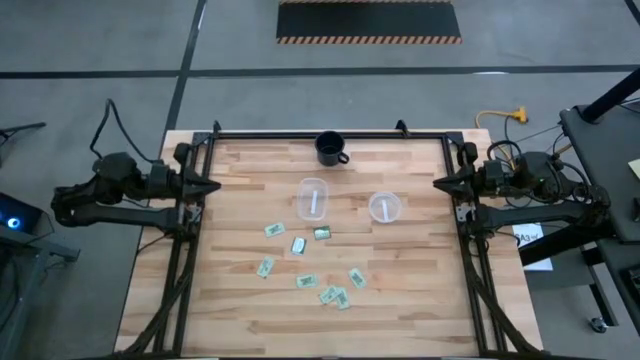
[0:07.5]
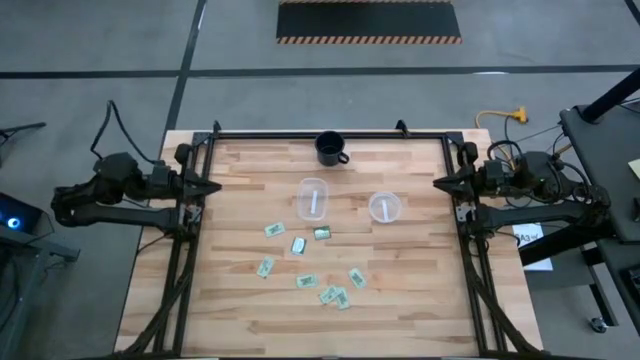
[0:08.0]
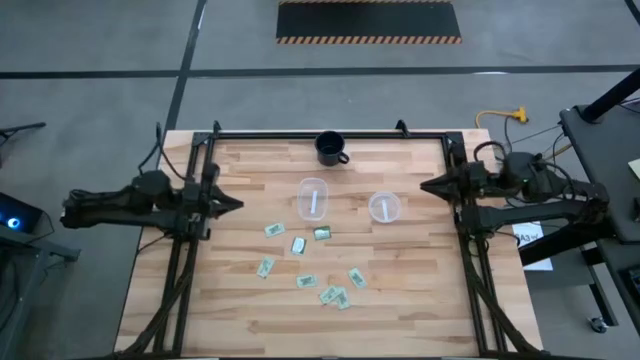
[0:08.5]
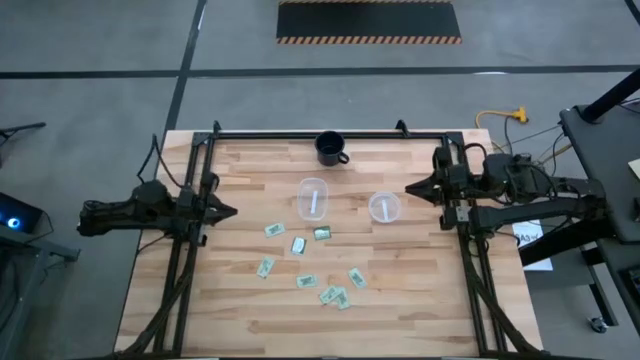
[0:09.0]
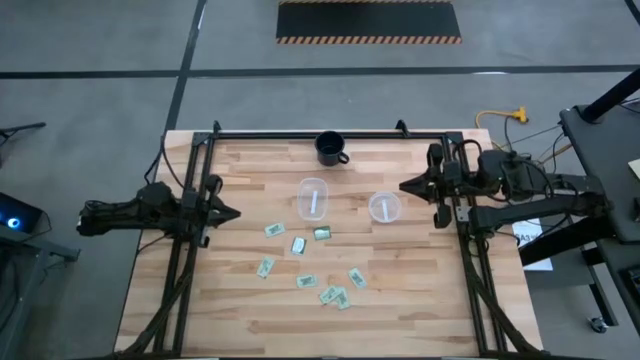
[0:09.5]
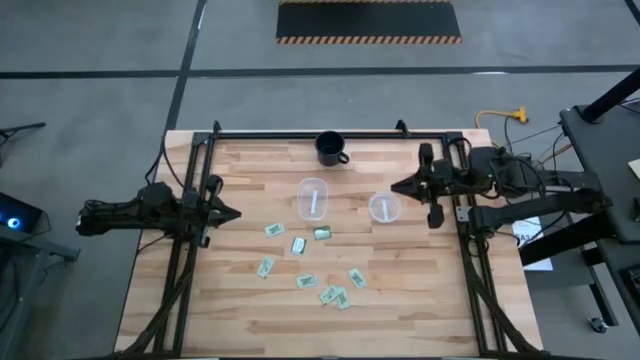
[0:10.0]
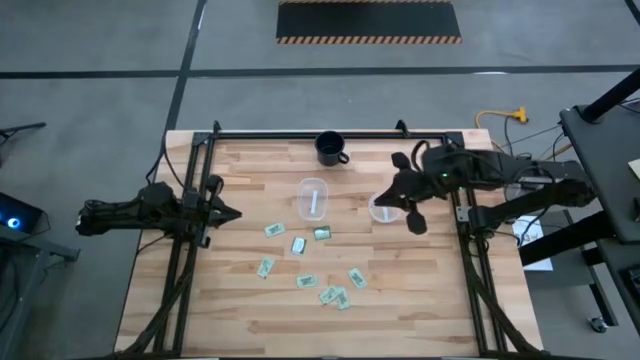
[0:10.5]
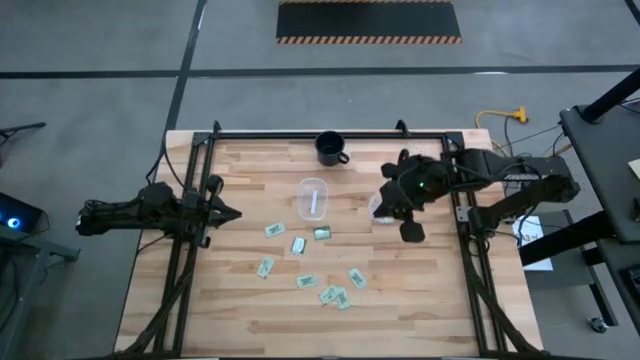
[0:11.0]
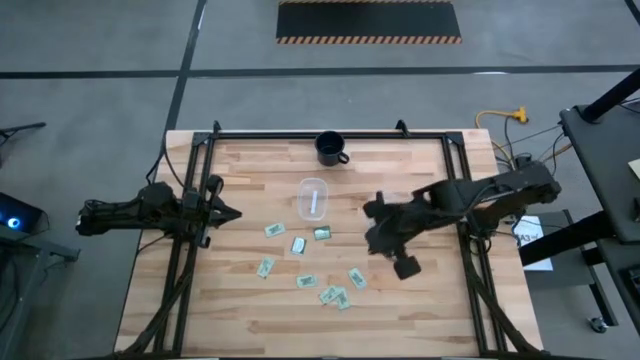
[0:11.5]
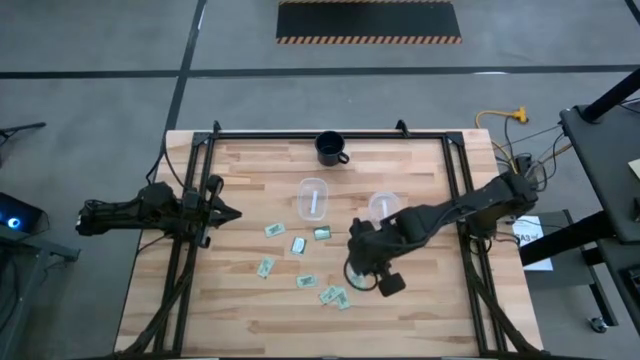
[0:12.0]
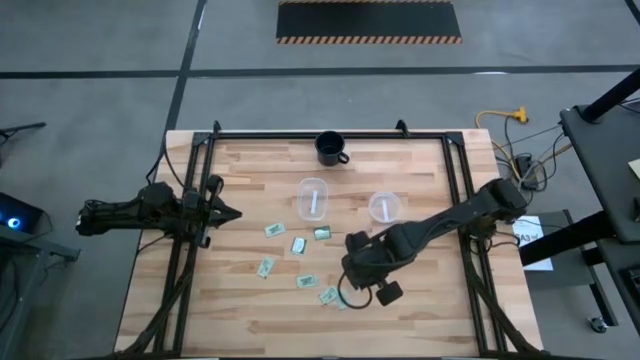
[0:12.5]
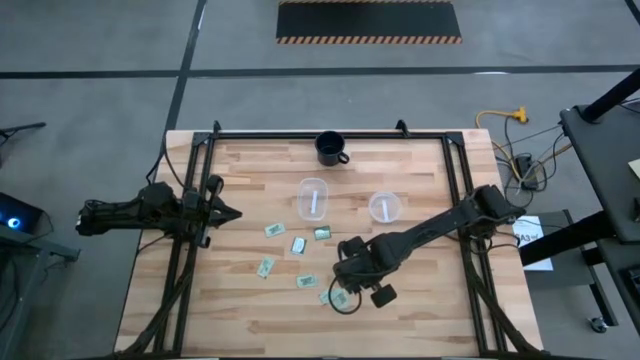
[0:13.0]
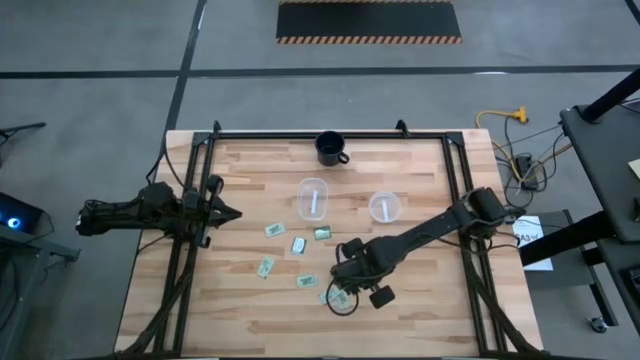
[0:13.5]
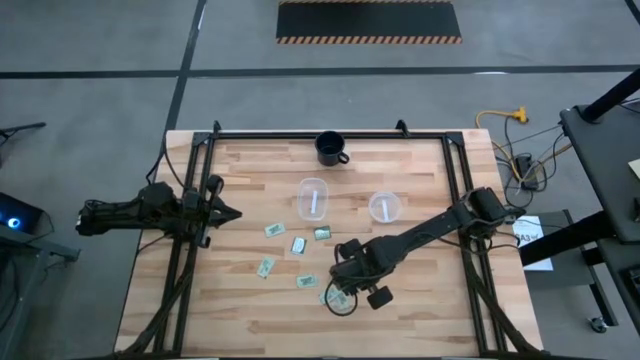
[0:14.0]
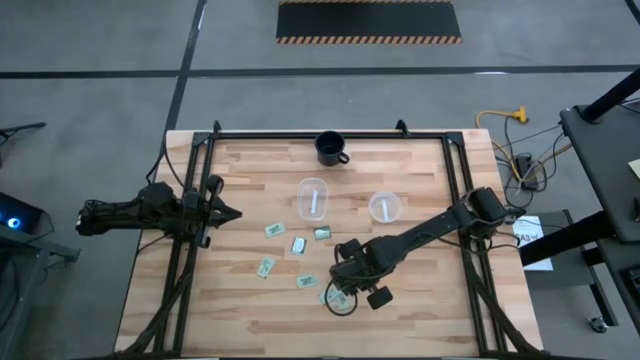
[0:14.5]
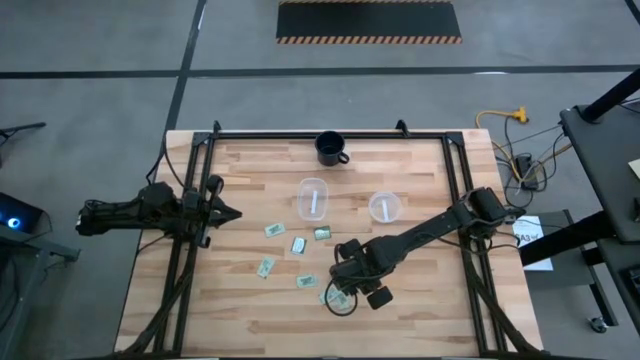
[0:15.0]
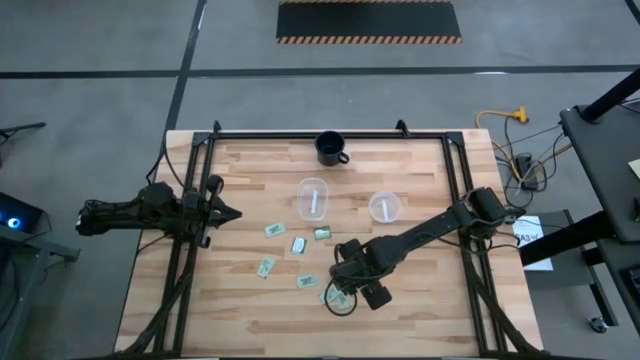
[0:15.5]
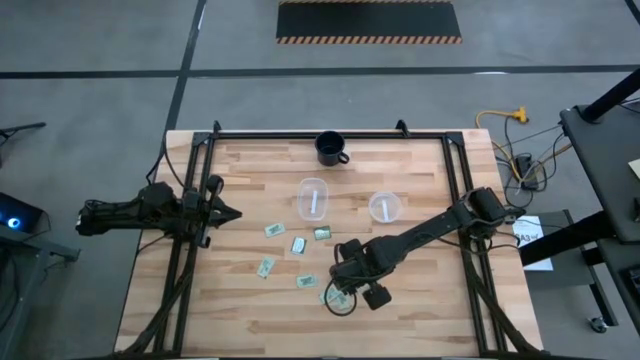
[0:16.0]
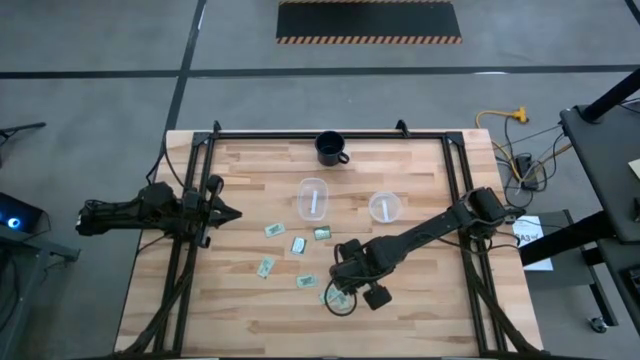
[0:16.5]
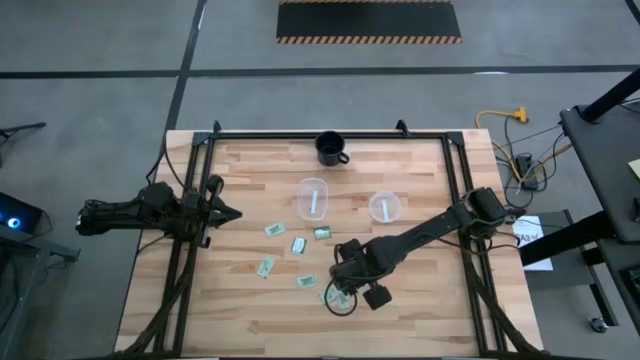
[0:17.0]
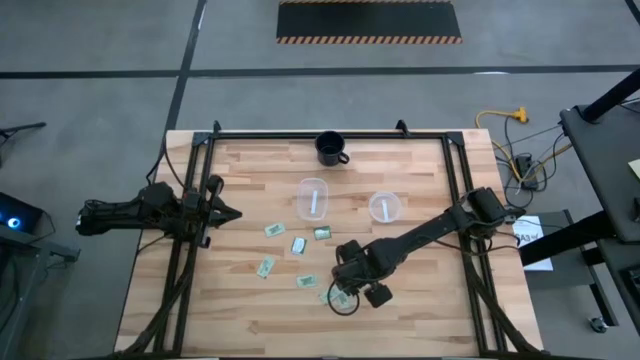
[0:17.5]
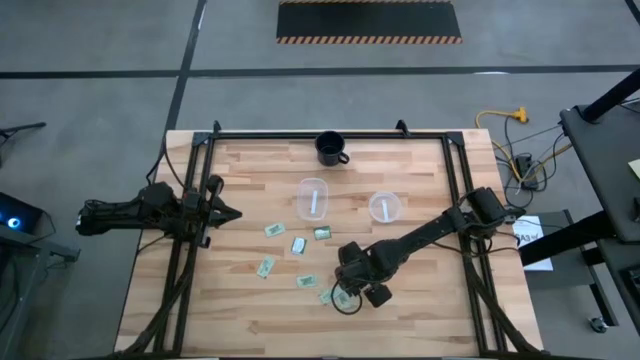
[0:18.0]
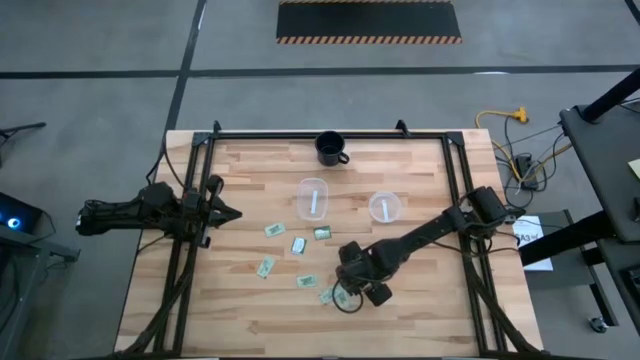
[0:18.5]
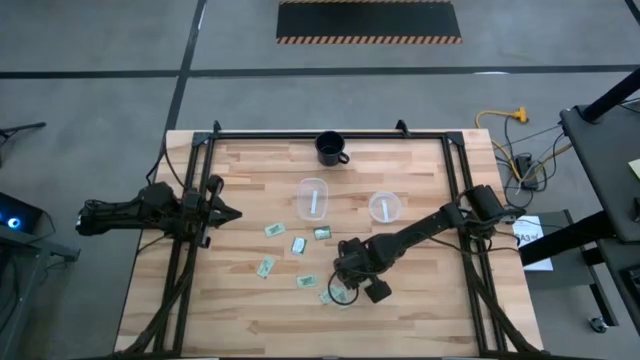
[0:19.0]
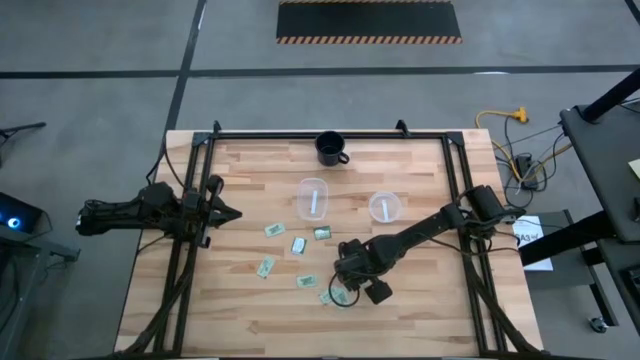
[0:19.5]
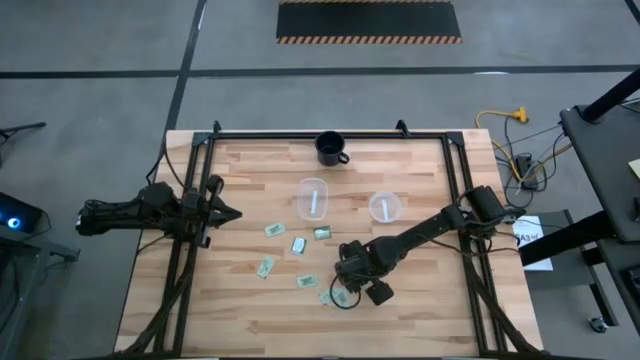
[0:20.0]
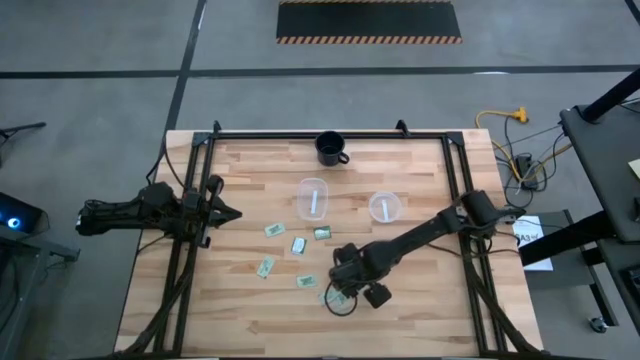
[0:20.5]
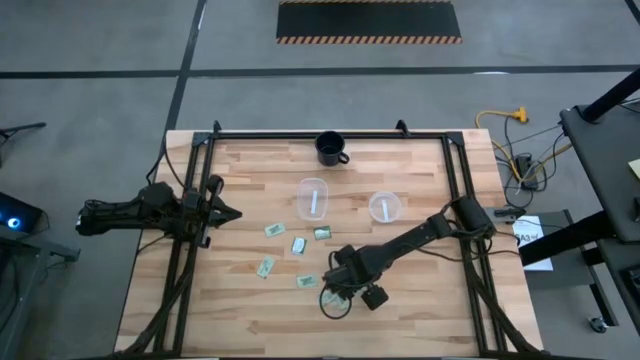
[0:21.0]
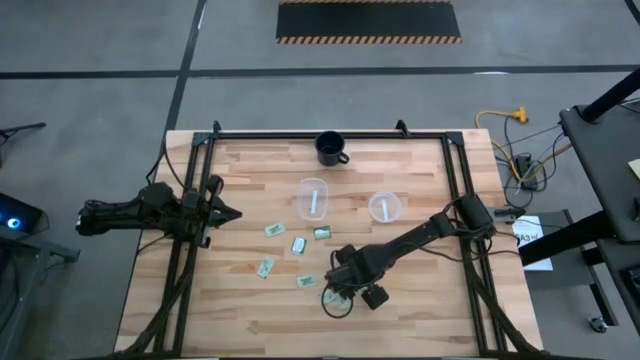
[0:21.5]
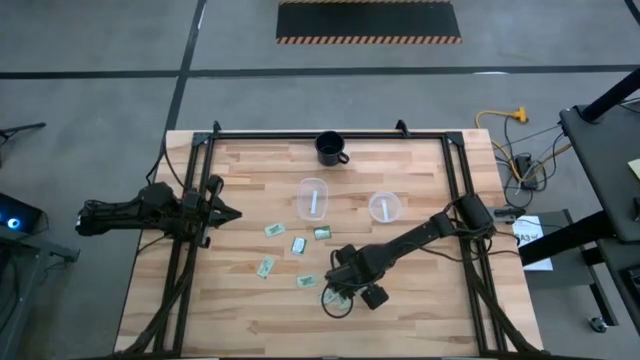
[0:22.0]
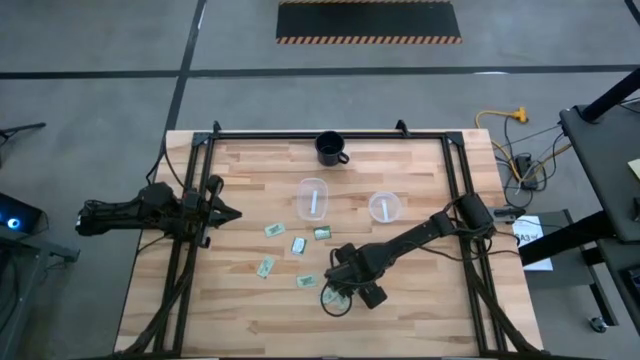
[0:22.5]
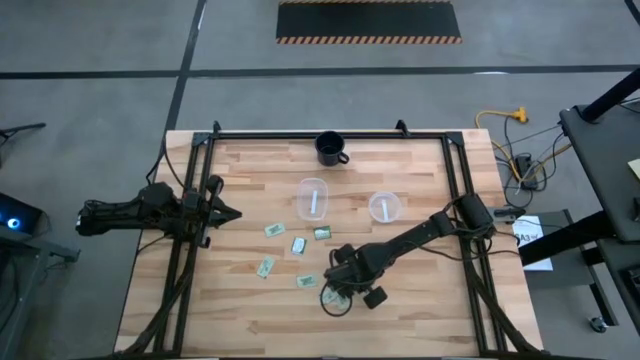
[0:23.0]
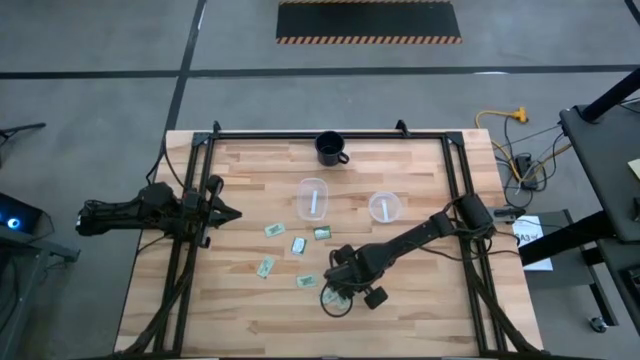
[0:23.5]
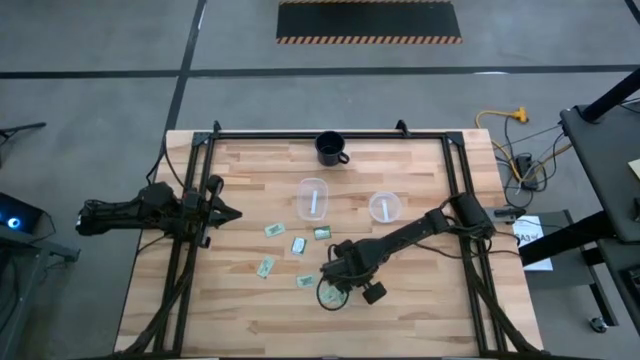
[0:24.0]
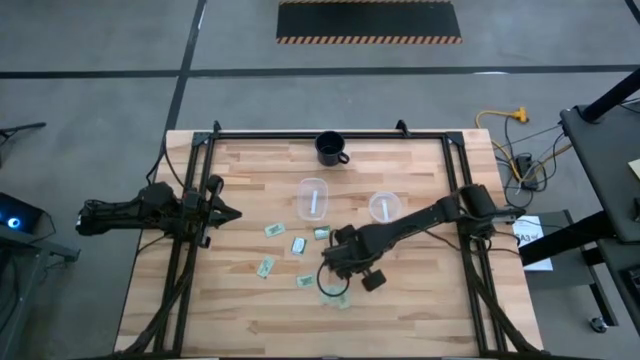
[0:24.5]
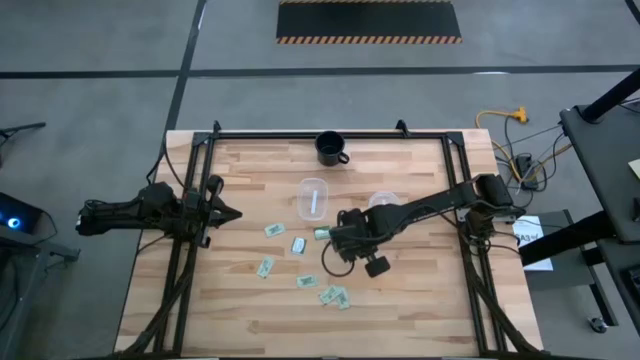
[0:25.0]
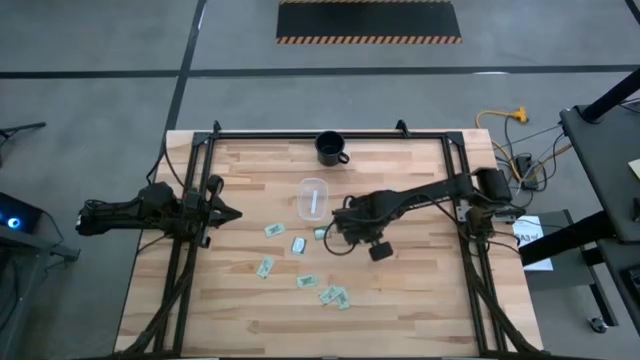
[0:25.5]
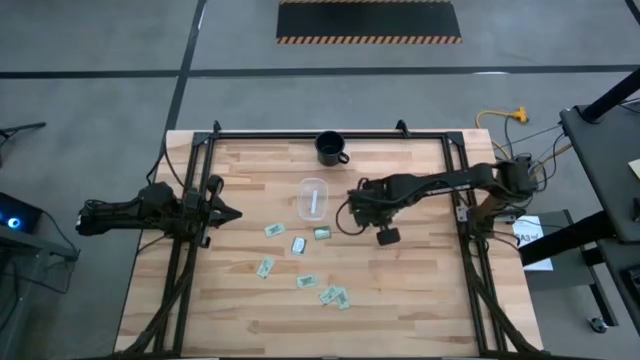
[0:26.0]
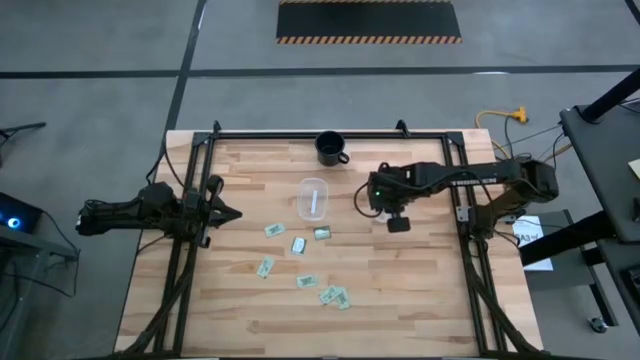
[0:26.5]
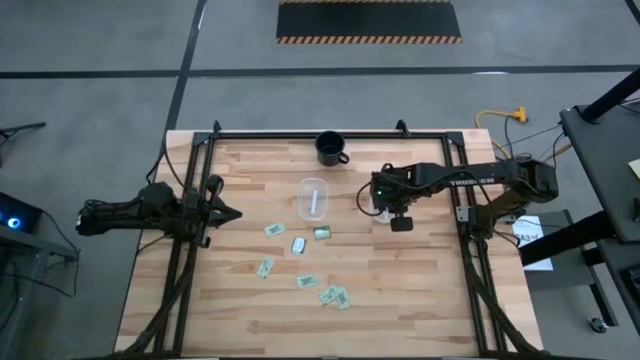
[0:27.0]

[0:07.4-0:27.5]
Task: Pick and place items into bin
Put the white stevia packet into the right transparent bin
